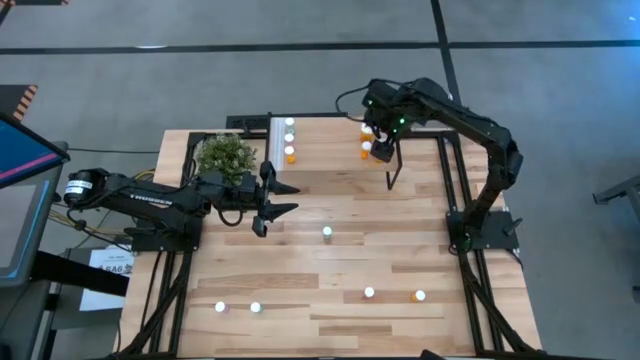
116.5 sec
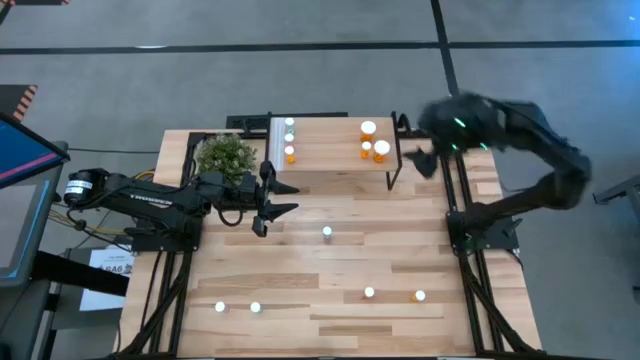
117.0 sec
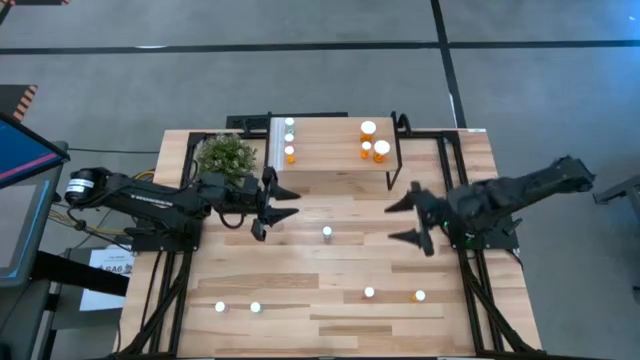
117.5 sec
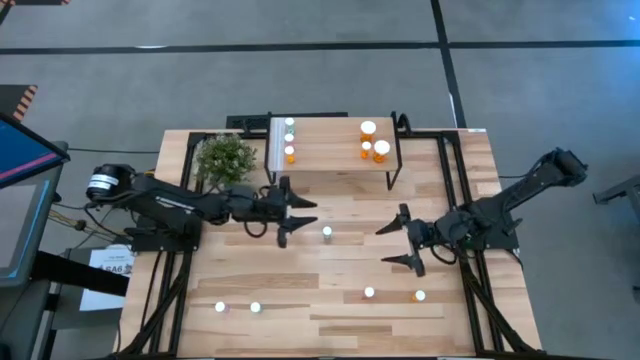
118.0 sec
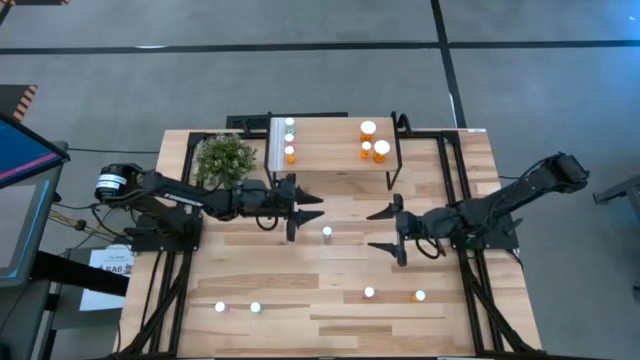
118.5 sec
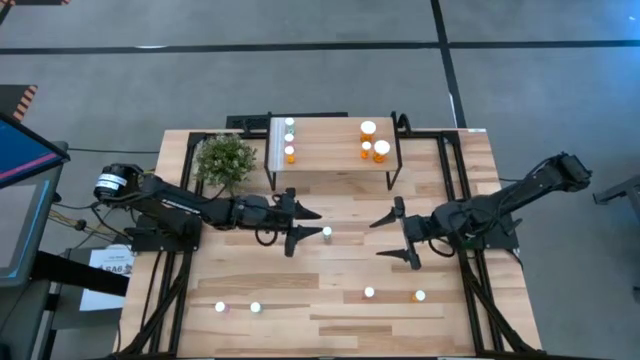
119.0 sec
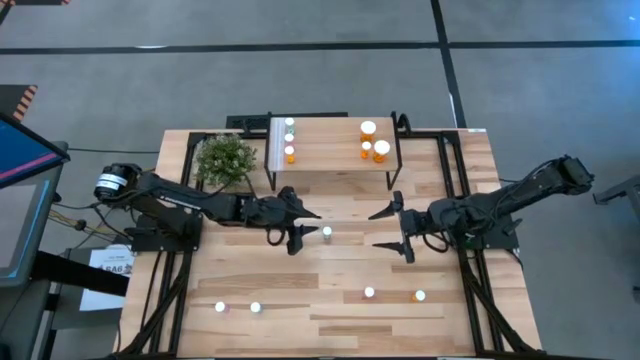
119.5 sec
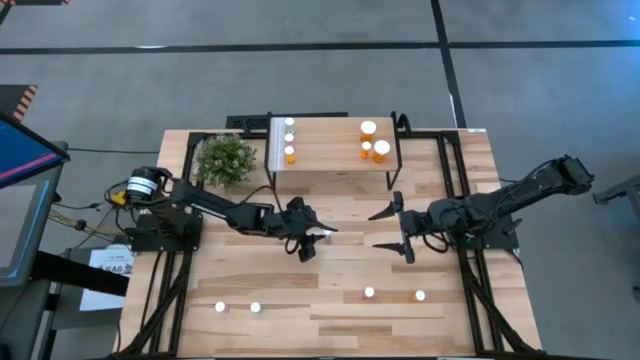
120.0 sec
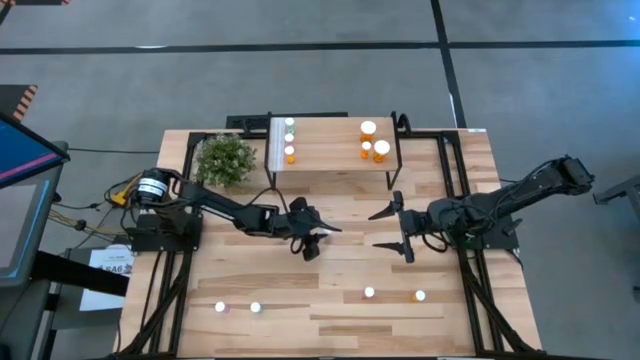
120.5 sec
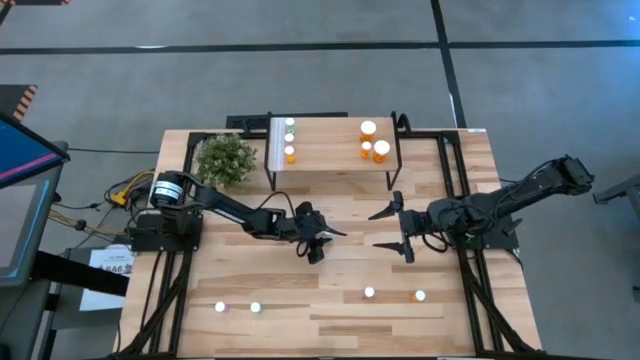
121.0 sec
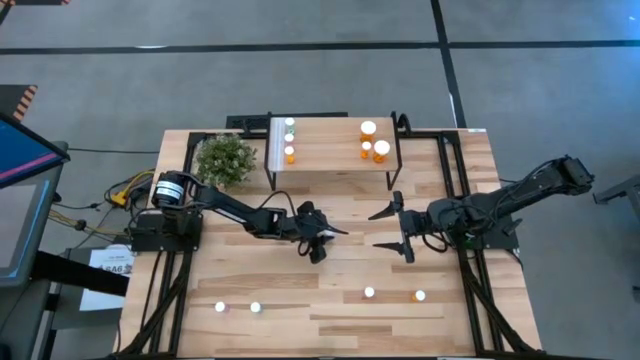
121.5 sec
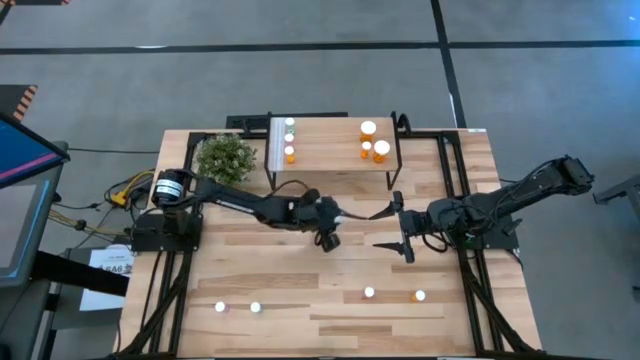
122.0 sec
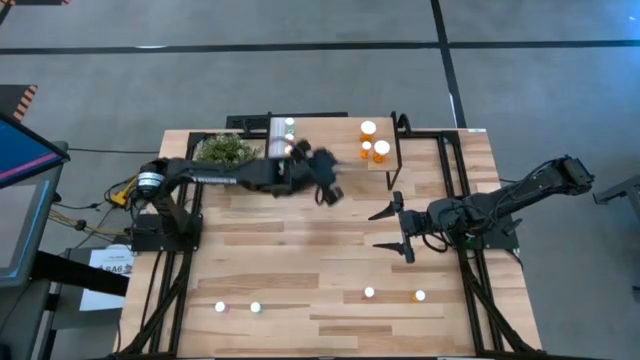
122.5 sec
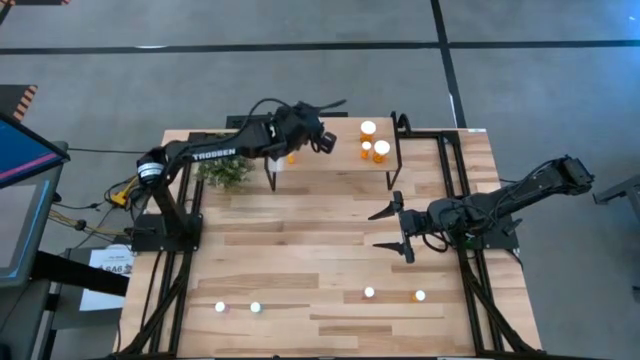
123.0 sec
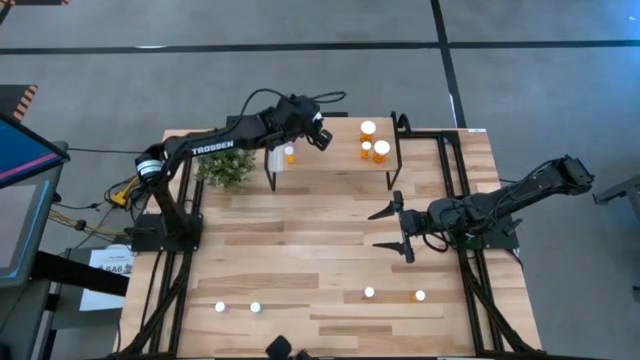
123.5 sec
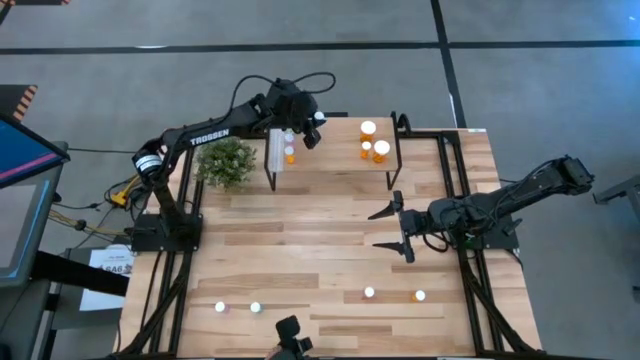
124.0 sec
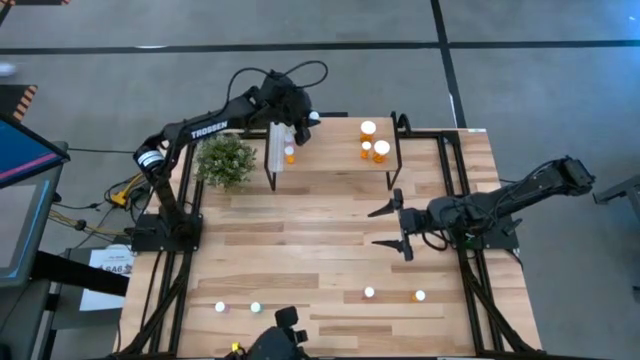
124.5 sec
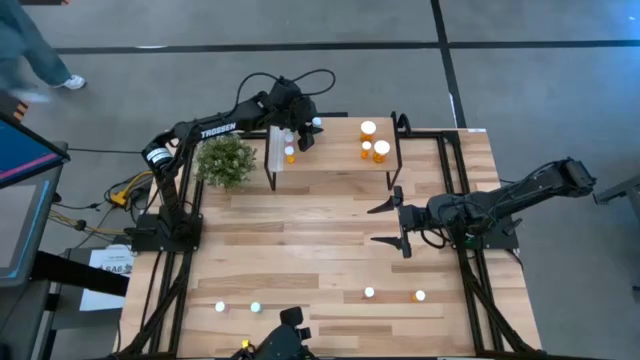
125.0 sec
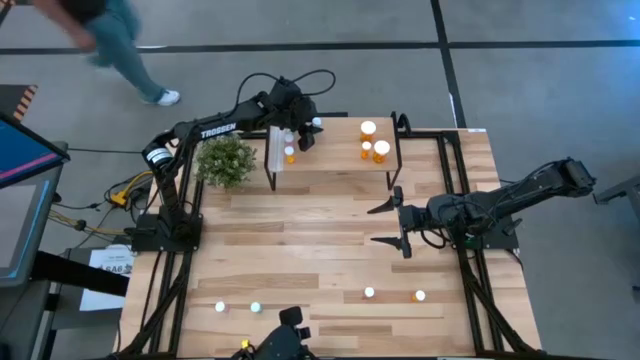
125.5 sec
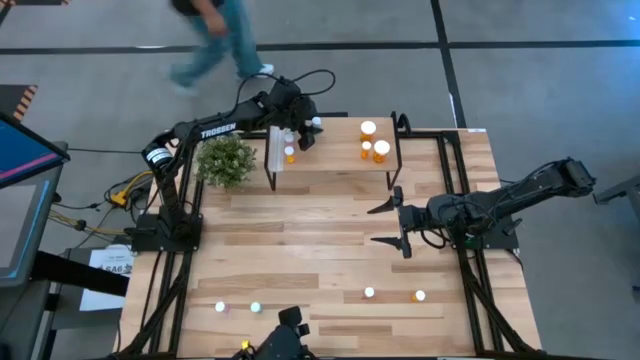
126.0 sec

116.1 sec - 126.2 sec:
Task: Pick and place medicine bottles onto shelf by color
Put the top blue small pill bottle on the shelf

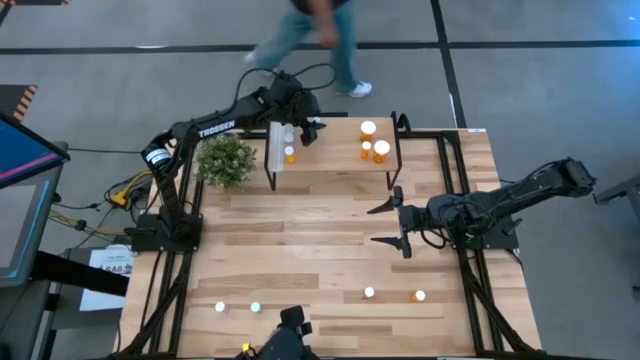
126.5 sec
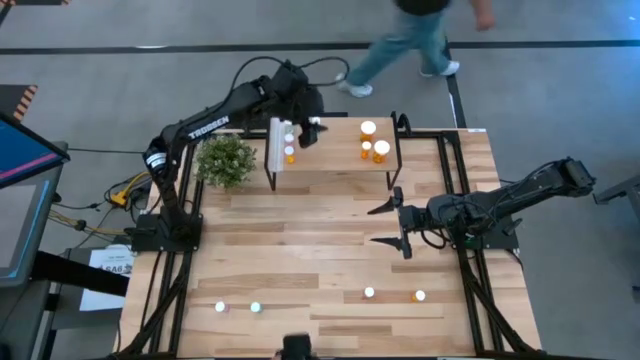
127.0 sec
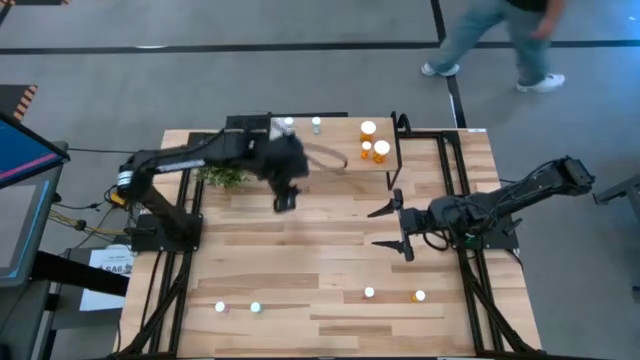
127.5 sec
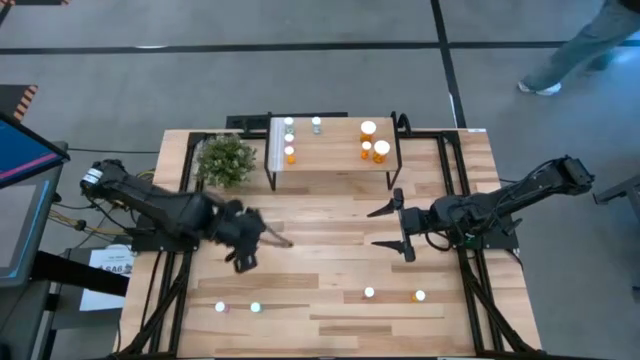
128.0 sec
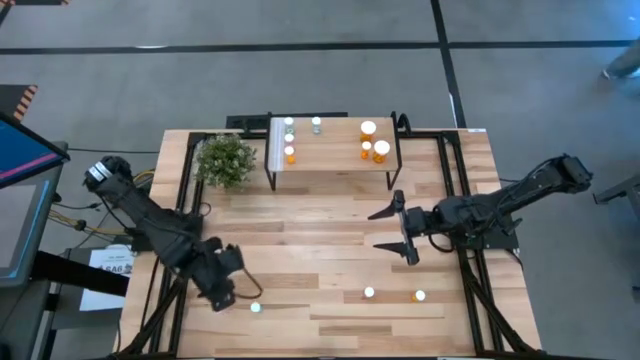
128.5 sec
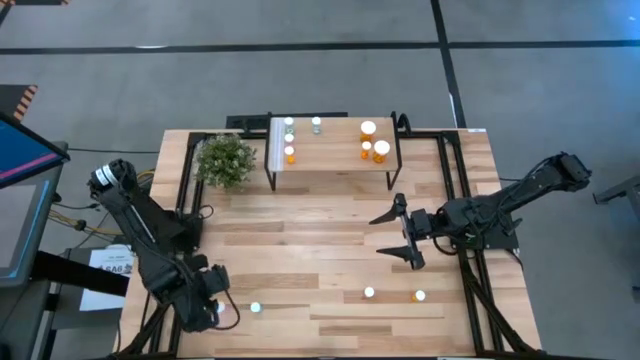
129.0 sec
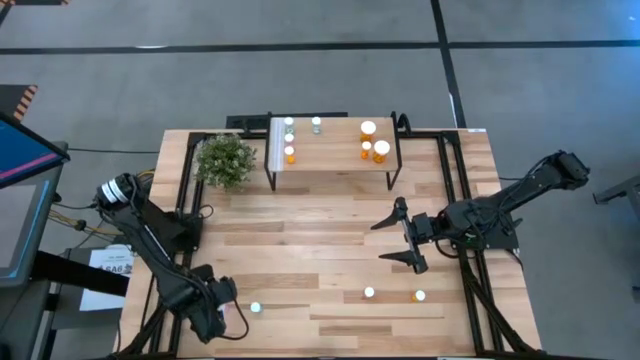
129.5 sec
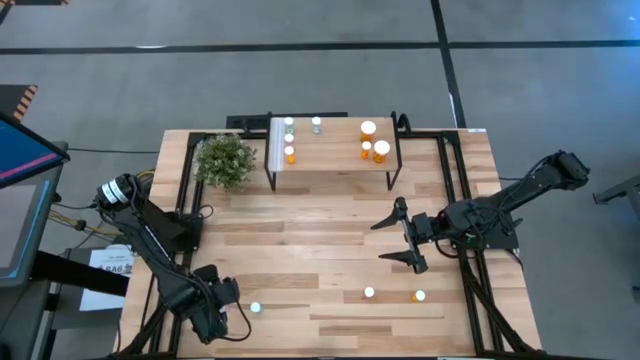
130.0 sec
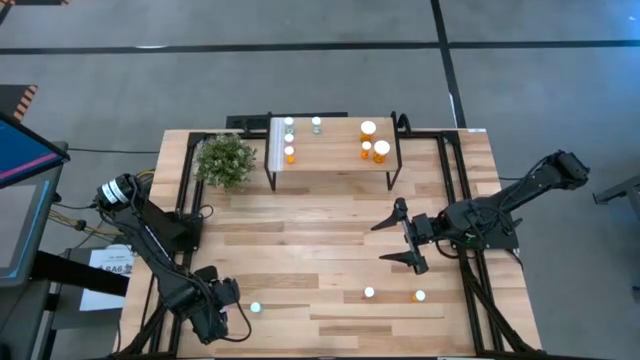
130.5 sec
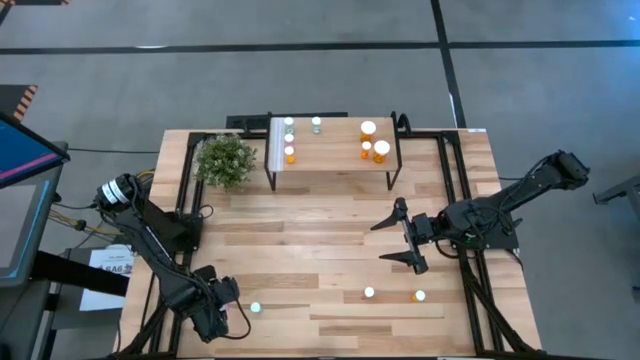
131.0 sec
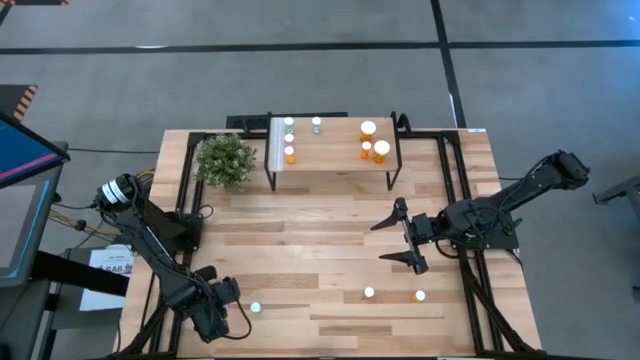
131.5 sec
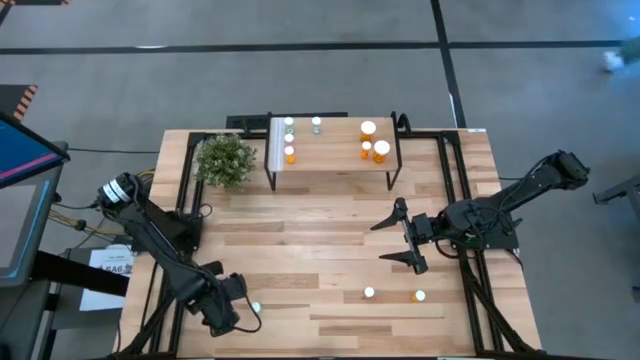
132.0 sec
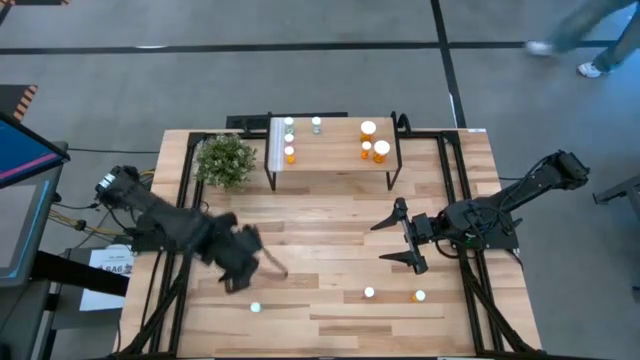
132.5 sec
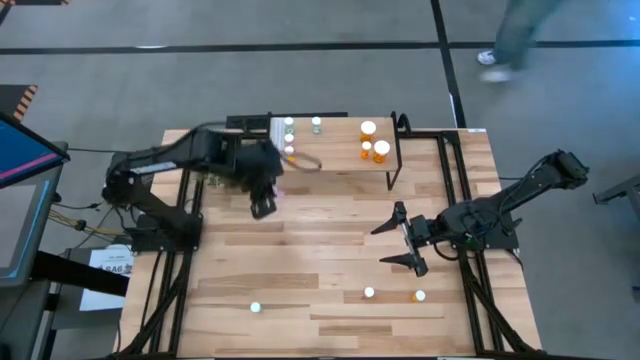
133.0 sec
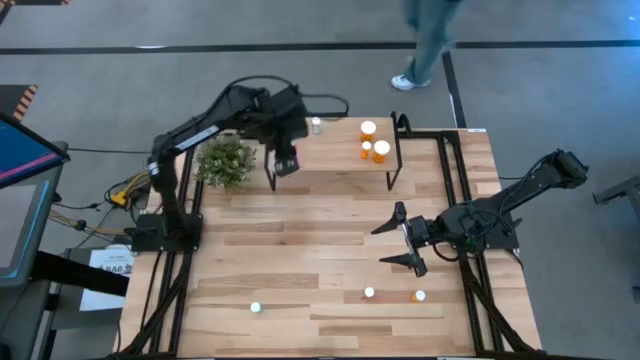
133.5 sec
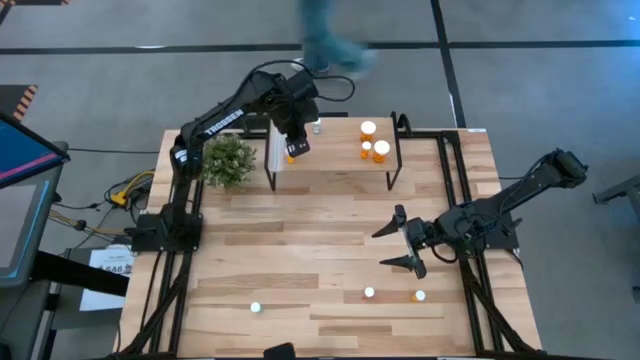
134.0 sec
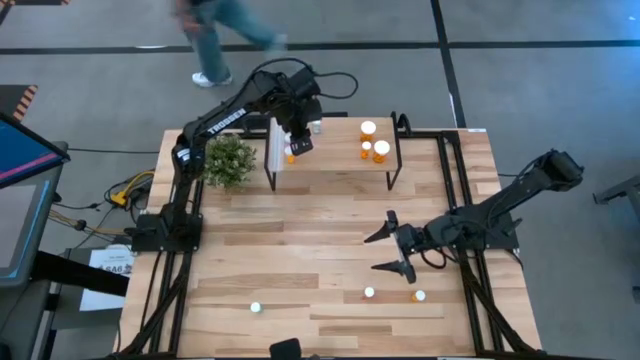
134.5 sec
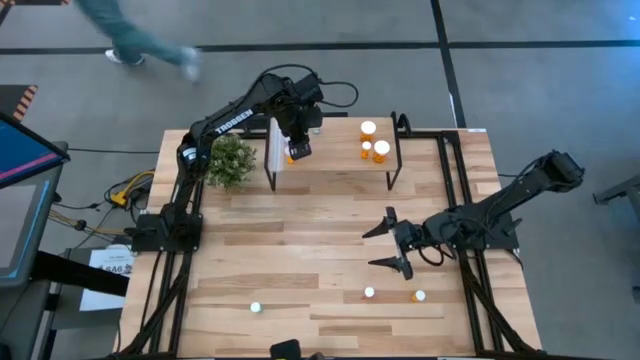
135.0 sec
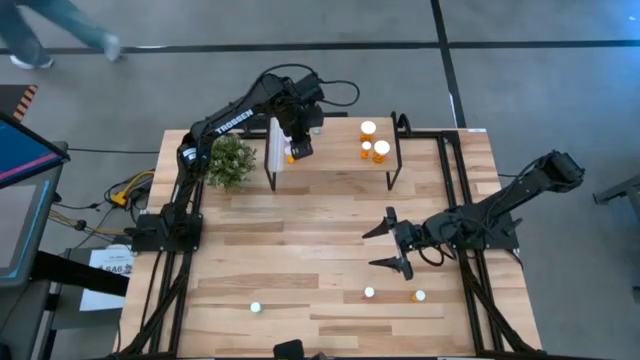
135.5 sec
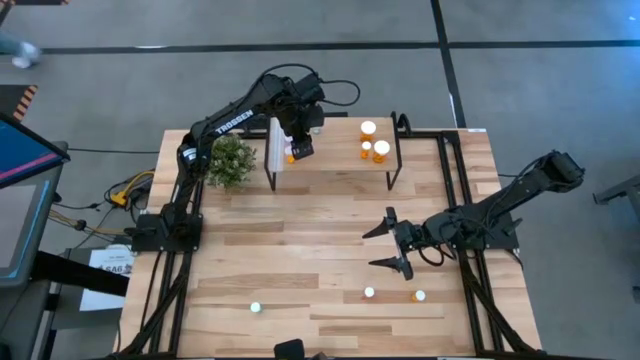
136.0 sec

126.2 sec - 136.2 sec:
Put the left pink small pill bottle on the shelf

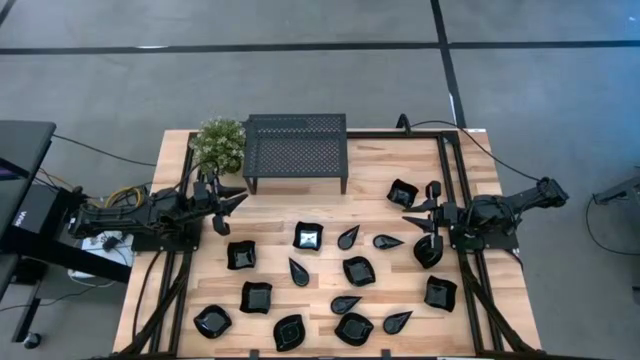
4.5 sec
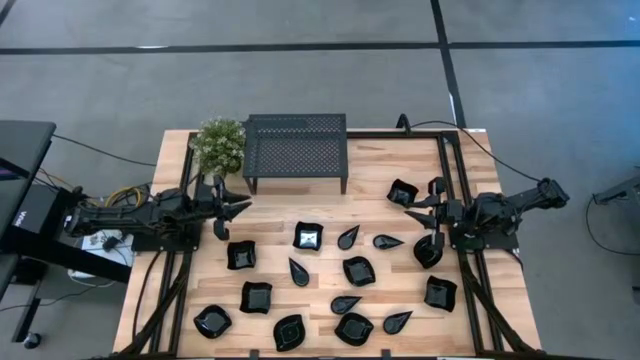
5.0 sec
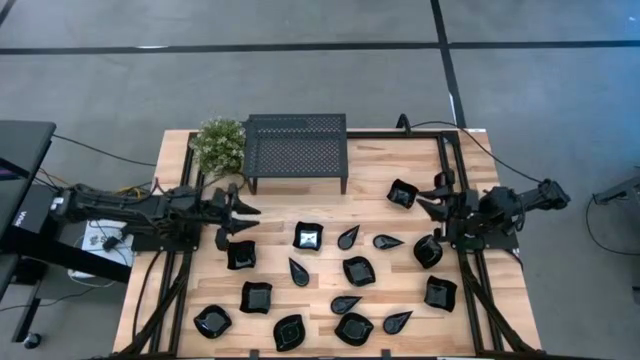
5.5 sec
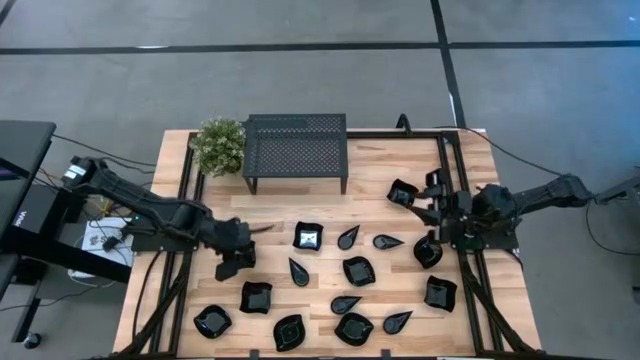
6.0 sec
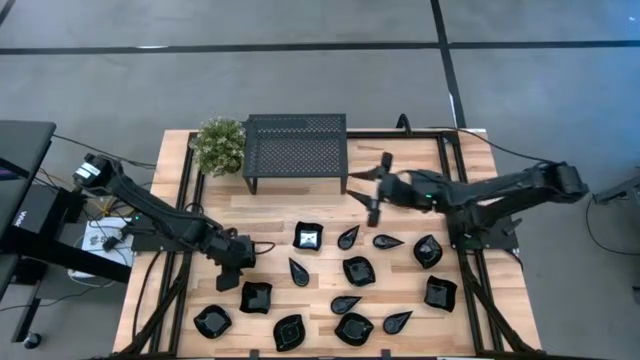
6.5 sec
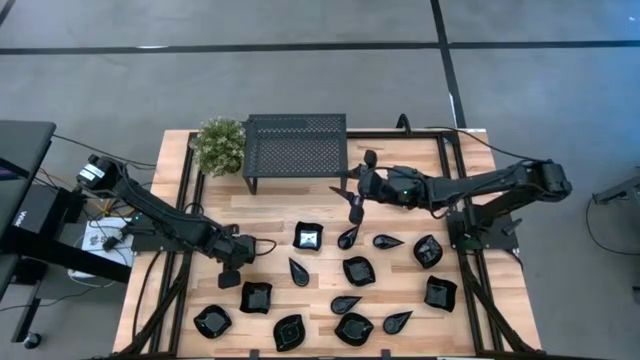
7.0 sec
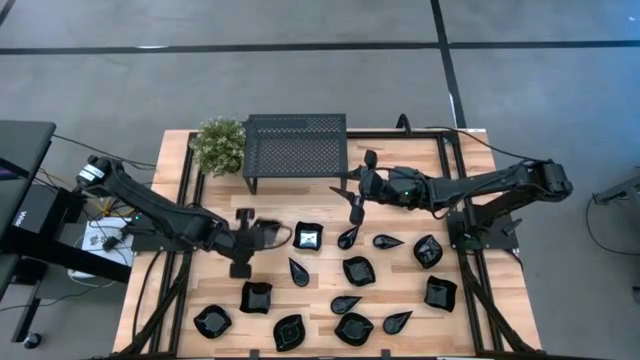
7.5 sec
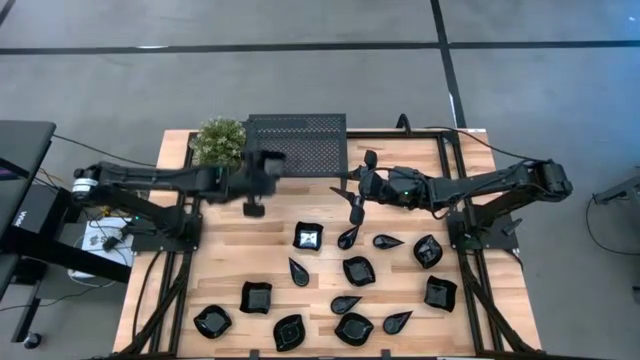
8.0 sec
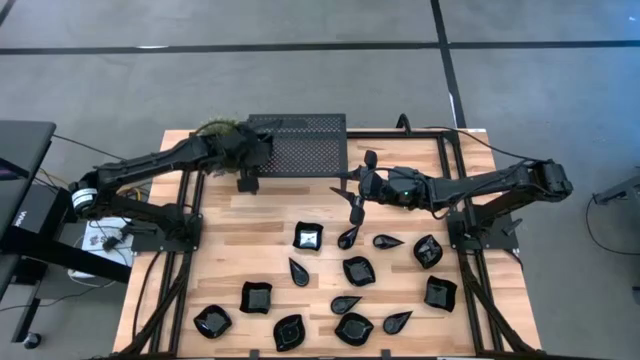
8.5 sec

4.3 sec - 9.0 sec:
Task: Pick & Place Mini shaped plates
Put the distorted square plate on the shelf
